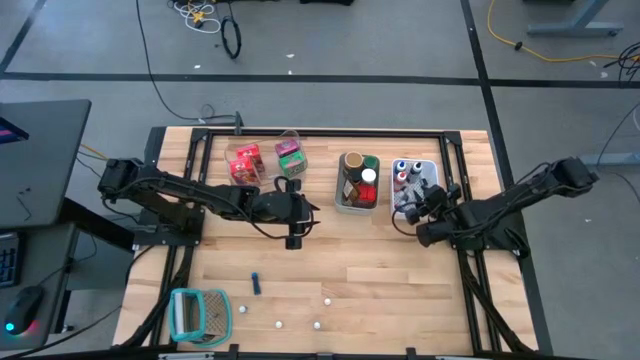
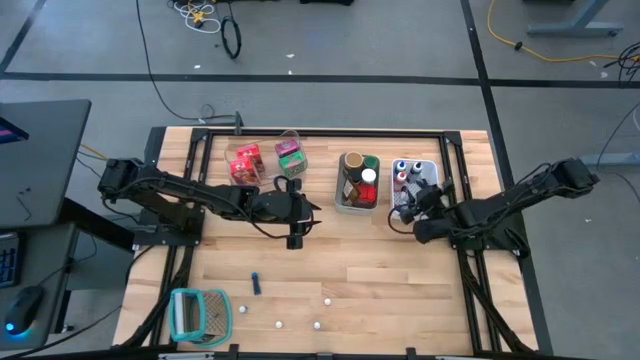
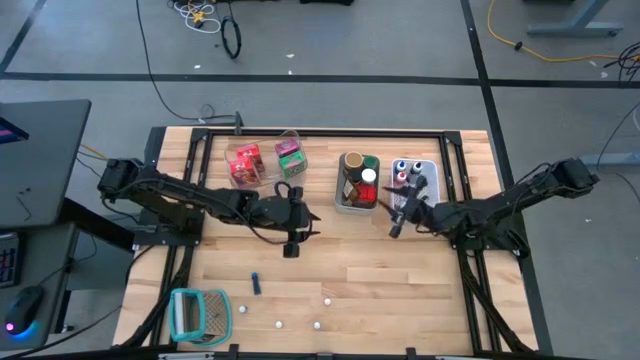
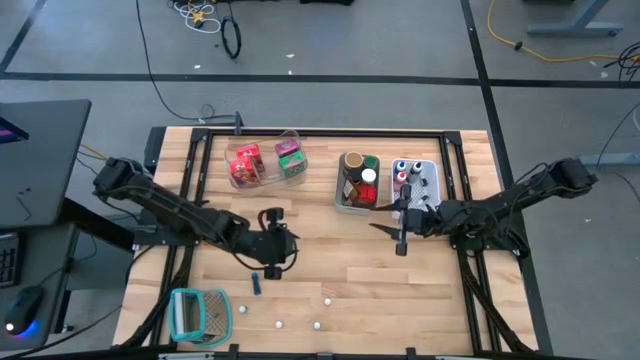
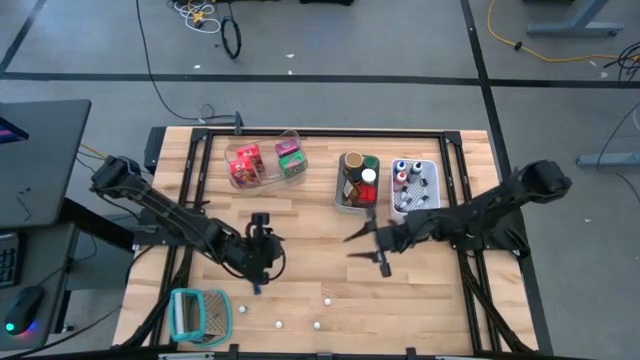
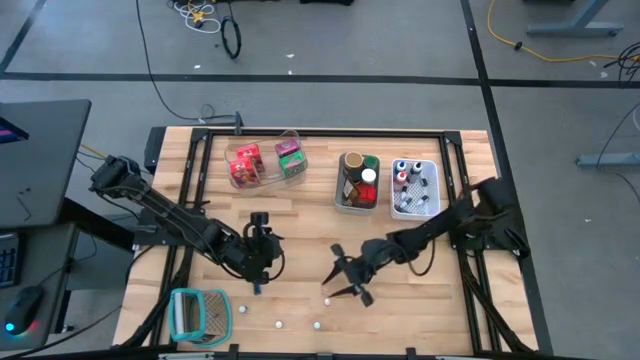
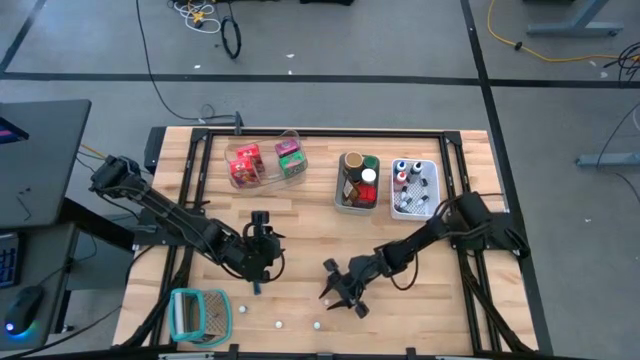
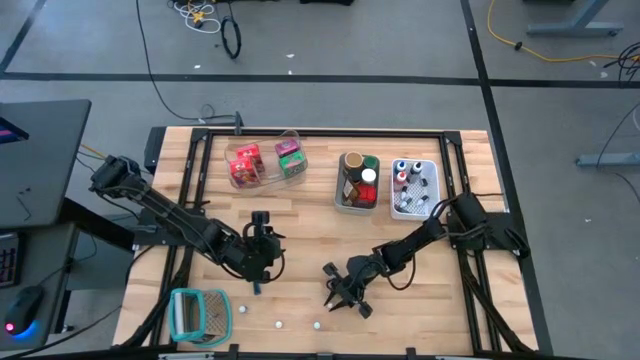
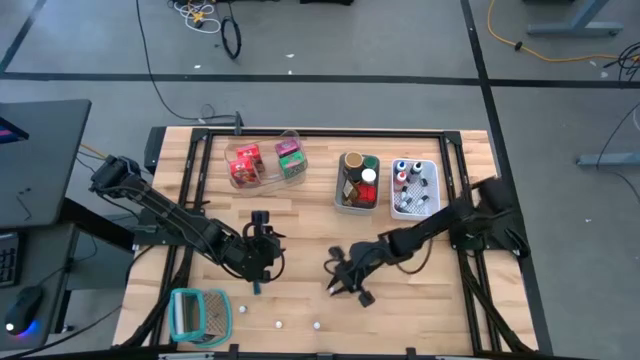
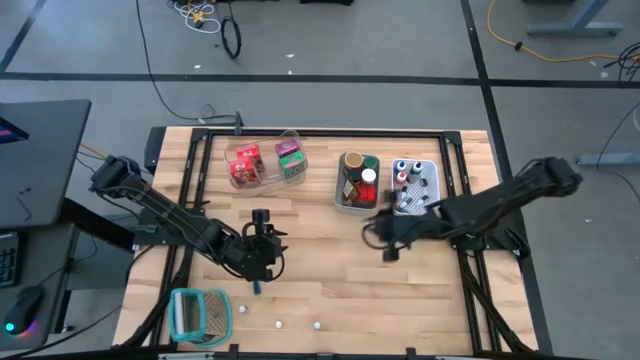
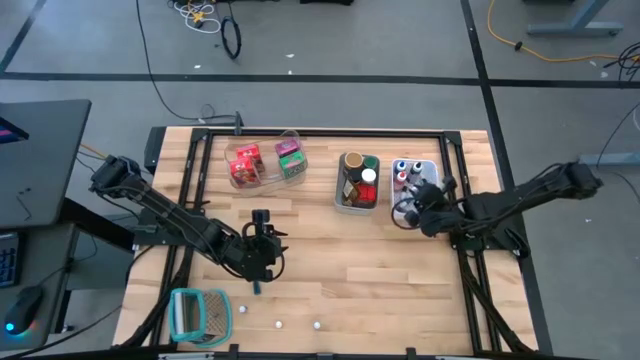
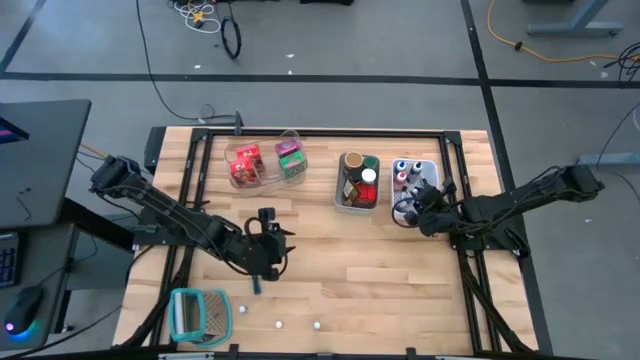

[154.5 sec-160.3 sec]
Task: Pick & Place Kitchen Items
Put the top small yellow food coloring bottle into the white bin

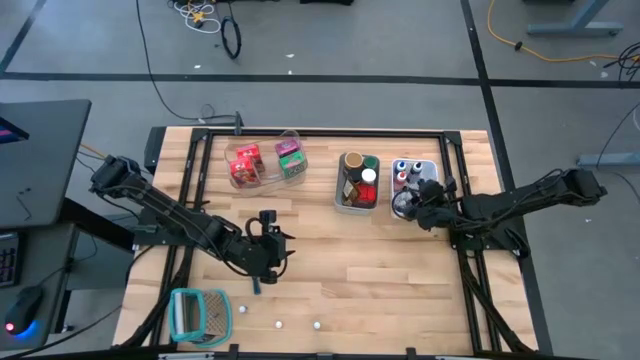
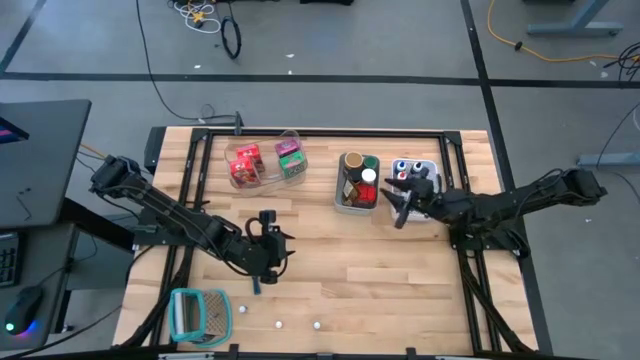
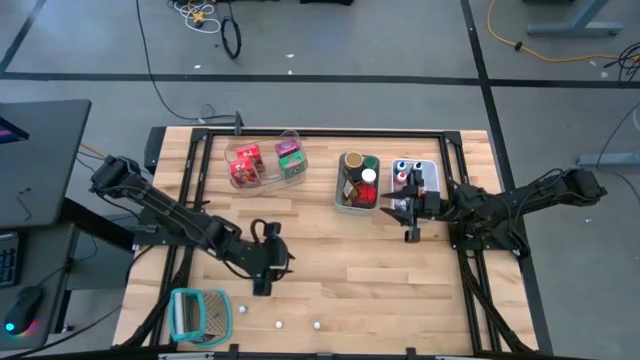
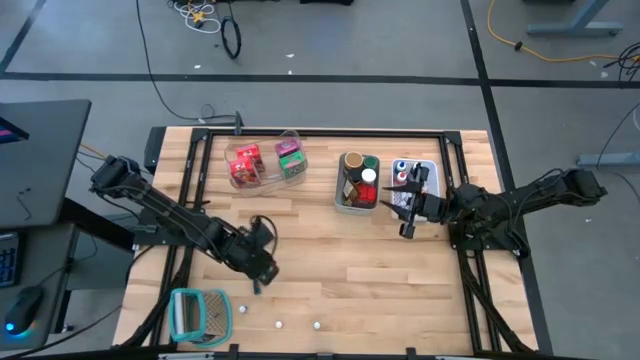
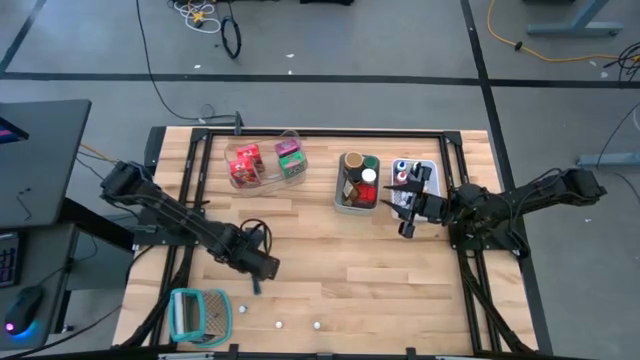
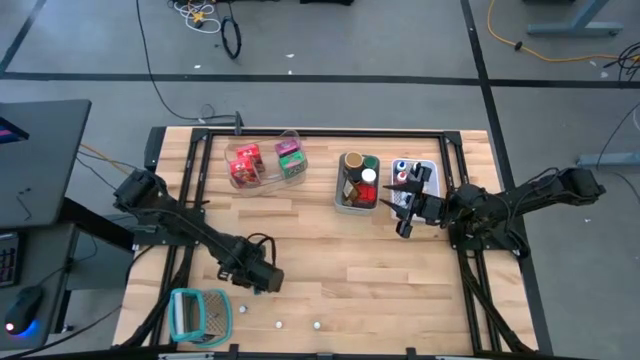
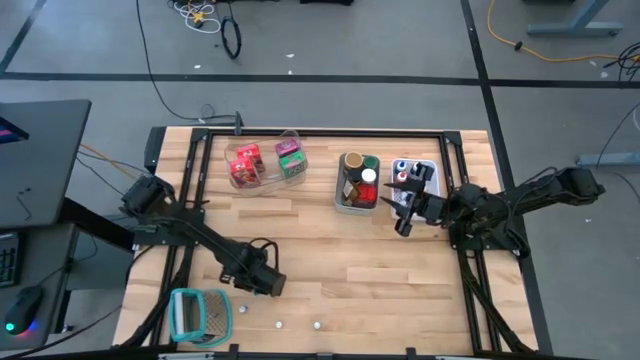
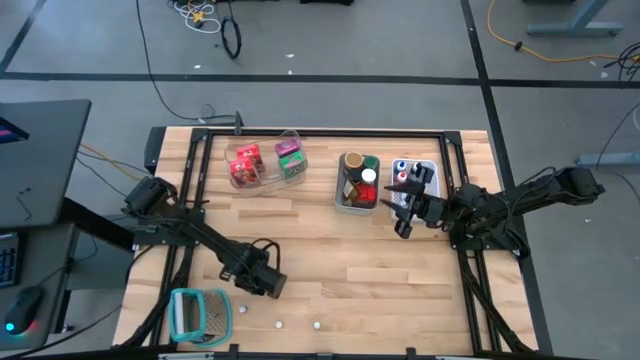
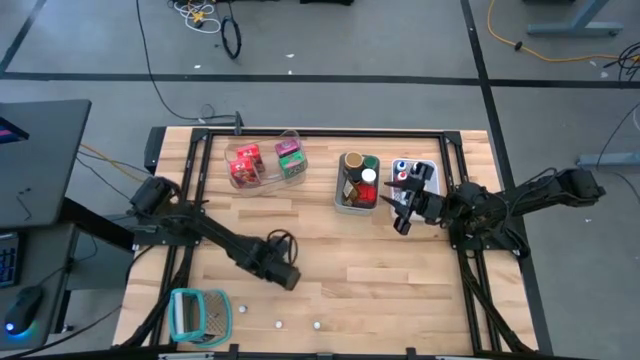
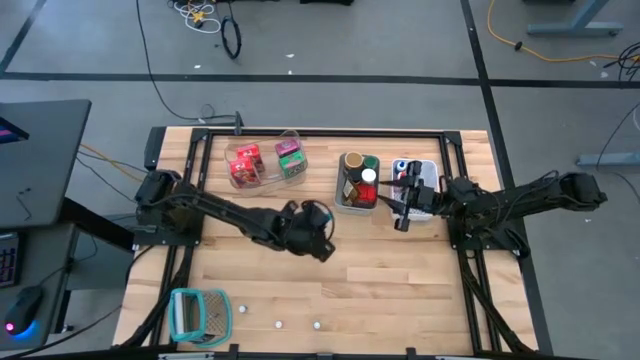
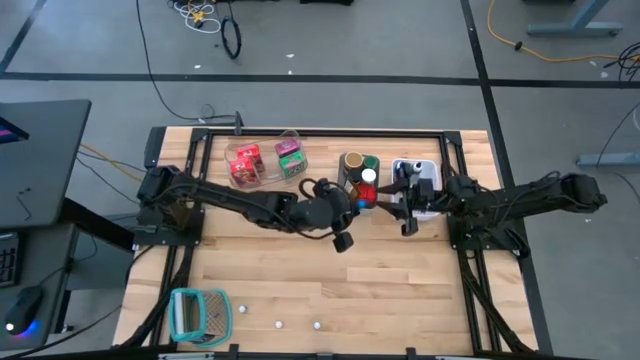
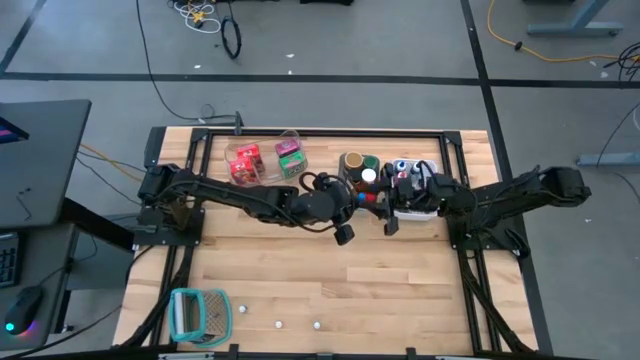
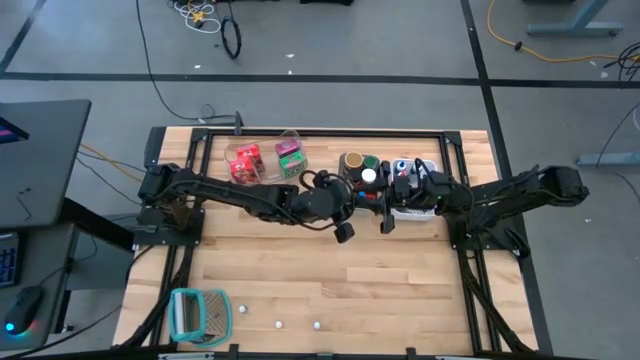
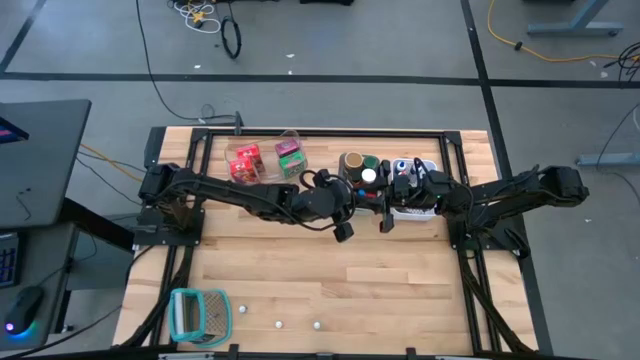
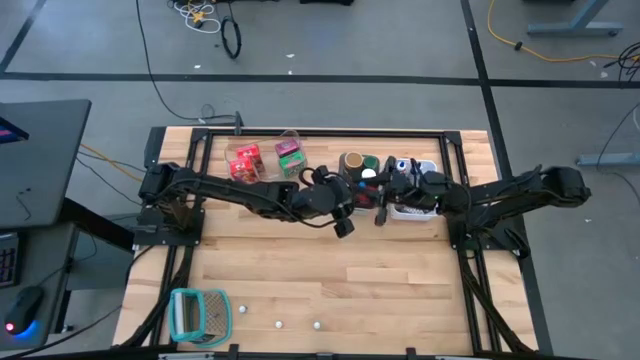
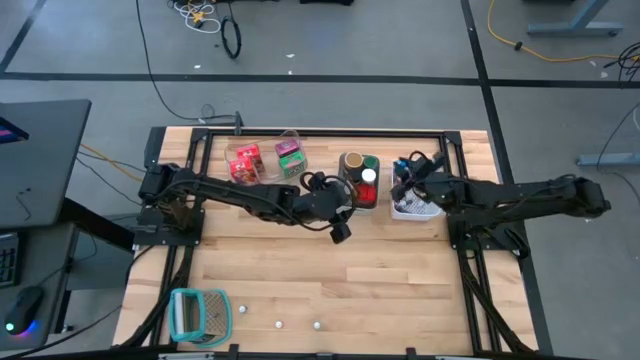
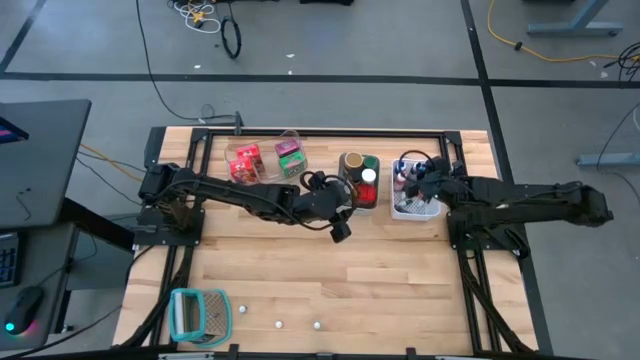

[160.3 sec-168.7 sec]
Put the small blue food coloring bottle into the white bin

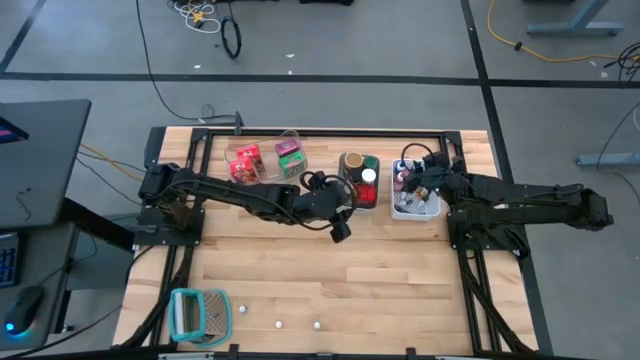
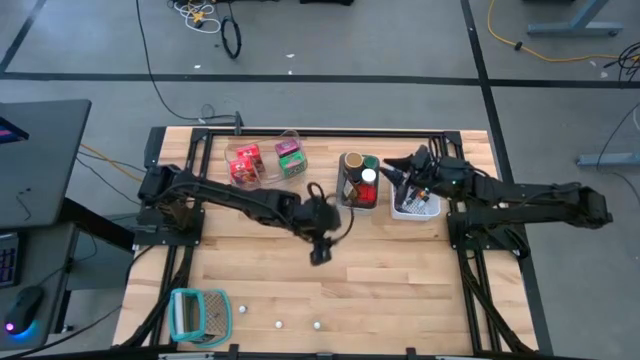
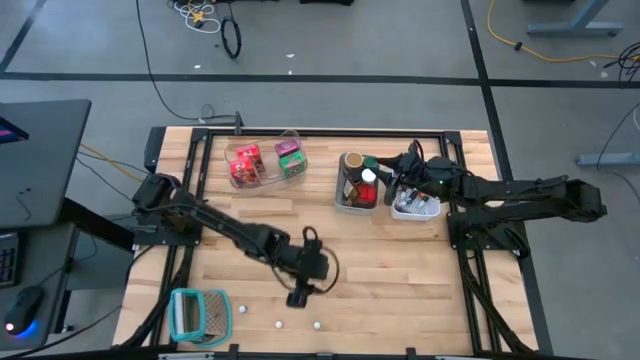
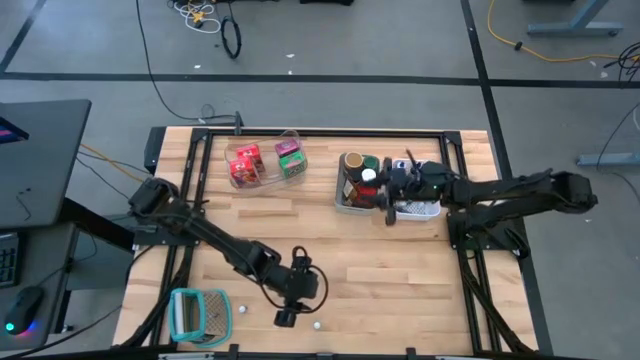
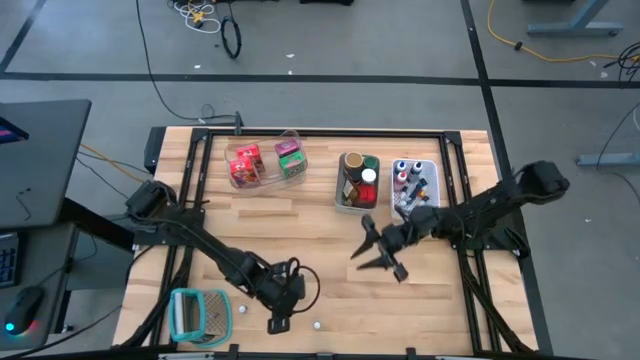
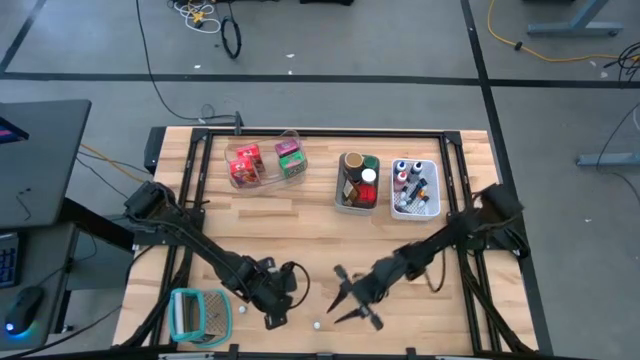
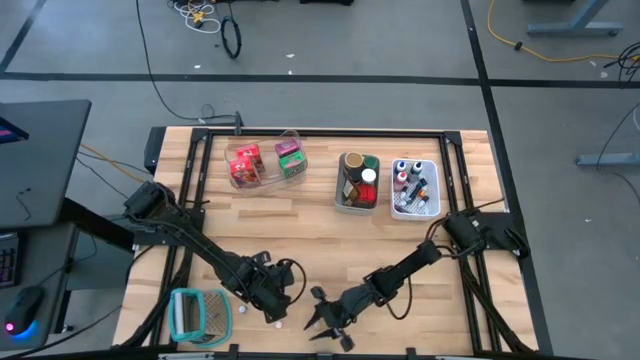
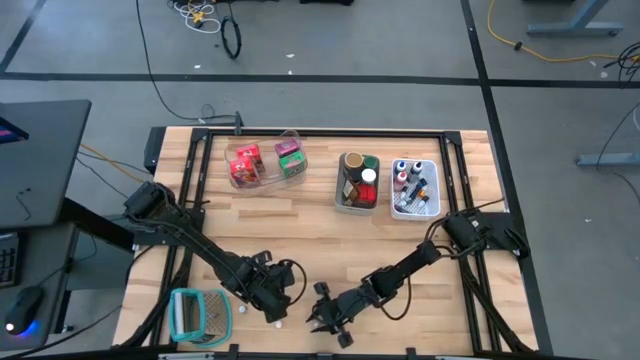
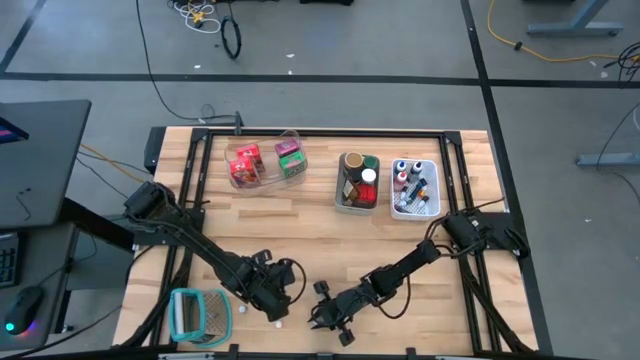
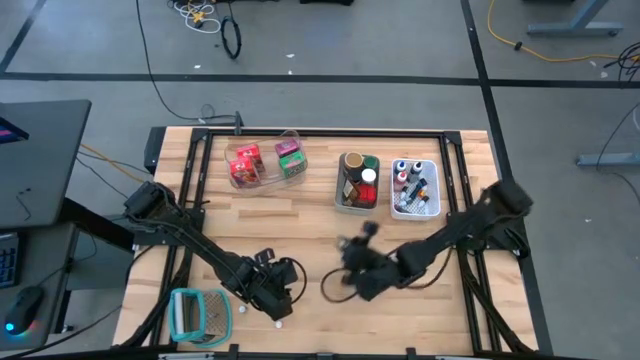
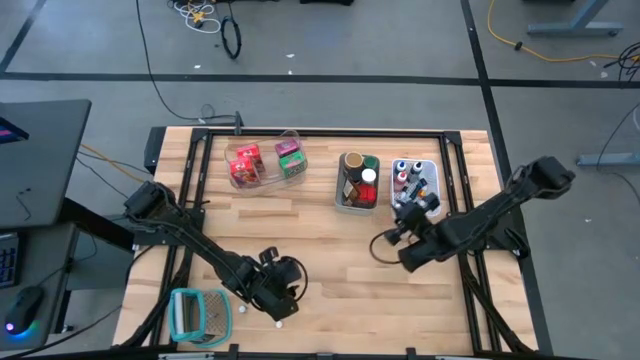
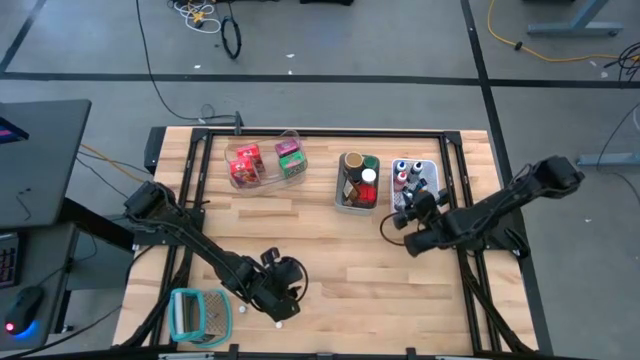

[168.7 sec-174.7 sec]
Put the small green food coloring bottle into the white bin
